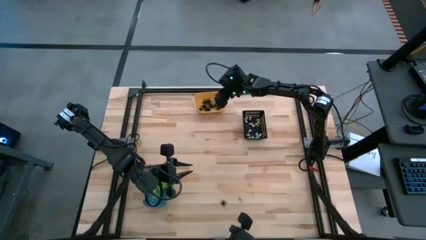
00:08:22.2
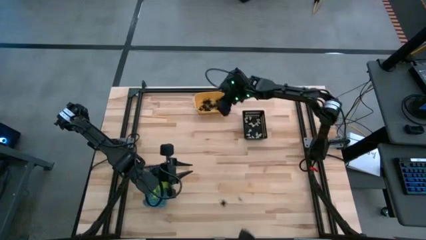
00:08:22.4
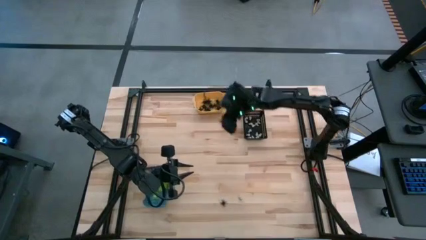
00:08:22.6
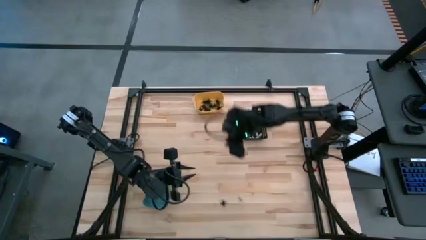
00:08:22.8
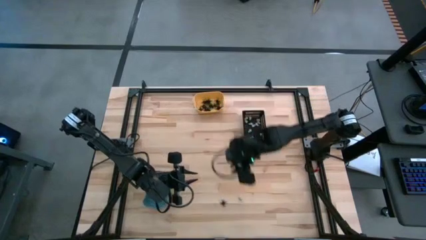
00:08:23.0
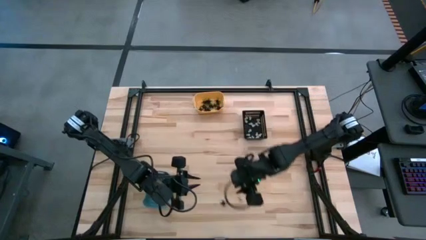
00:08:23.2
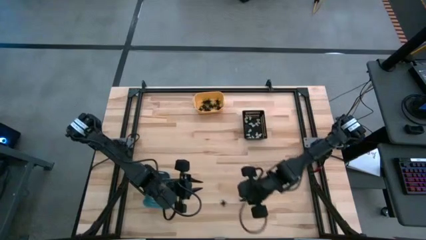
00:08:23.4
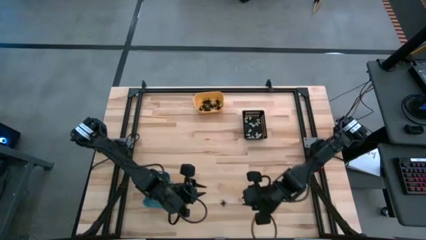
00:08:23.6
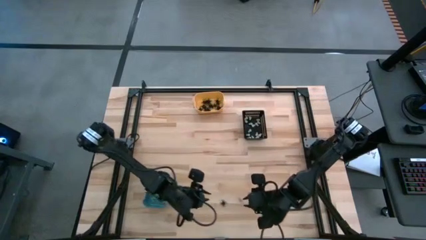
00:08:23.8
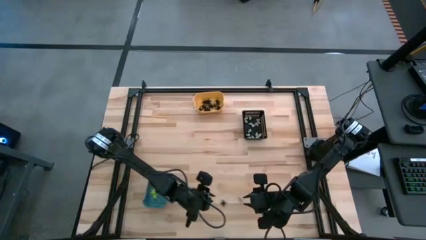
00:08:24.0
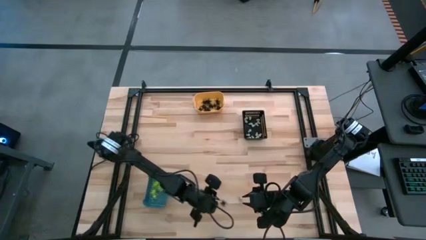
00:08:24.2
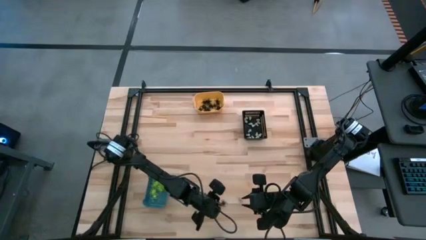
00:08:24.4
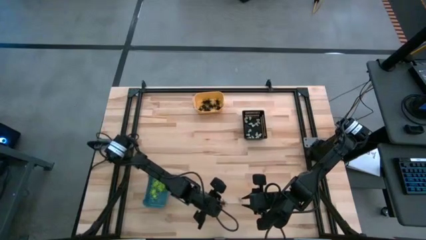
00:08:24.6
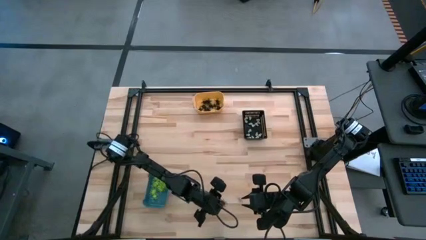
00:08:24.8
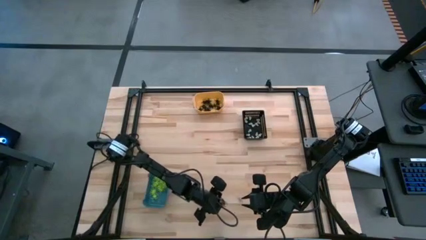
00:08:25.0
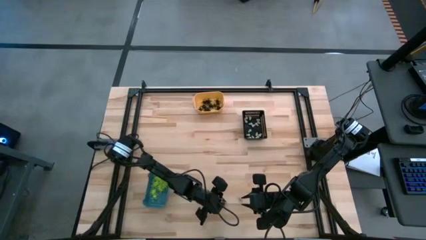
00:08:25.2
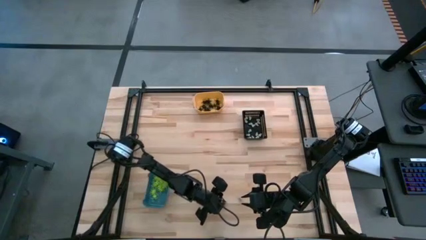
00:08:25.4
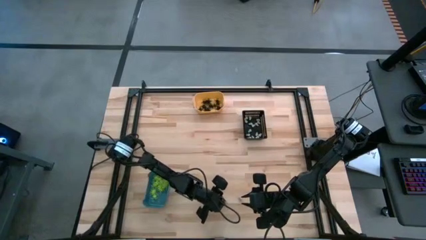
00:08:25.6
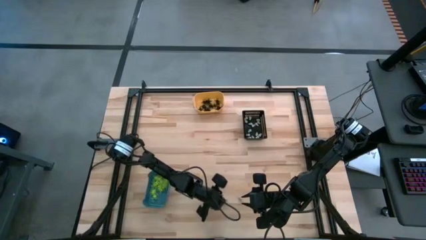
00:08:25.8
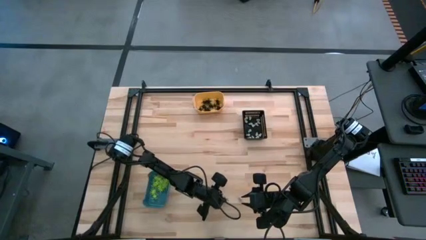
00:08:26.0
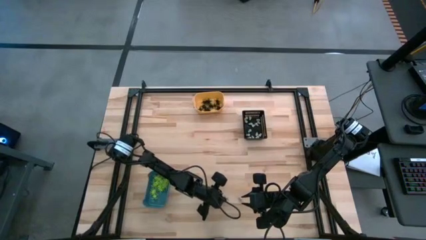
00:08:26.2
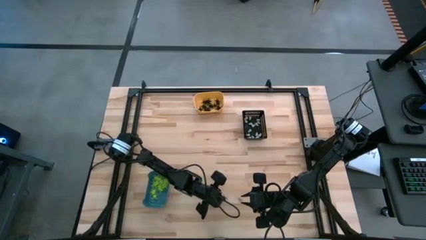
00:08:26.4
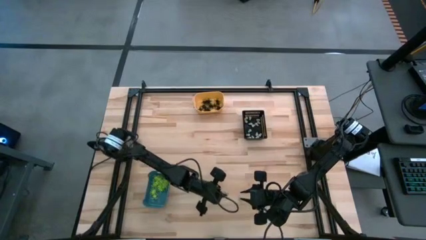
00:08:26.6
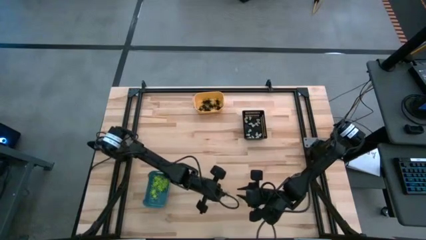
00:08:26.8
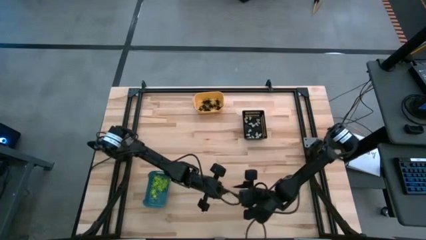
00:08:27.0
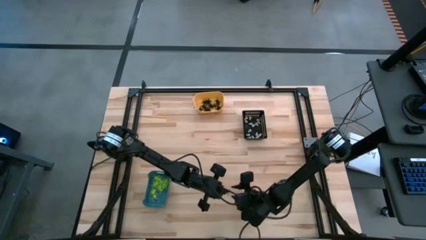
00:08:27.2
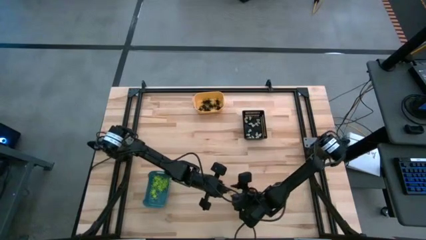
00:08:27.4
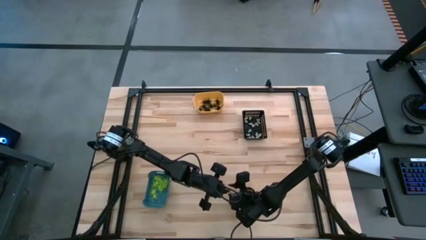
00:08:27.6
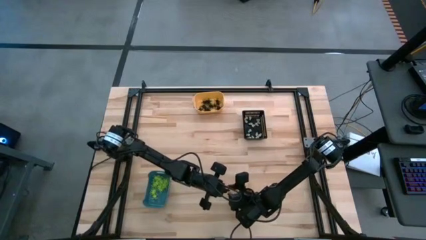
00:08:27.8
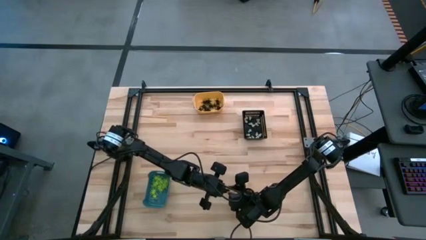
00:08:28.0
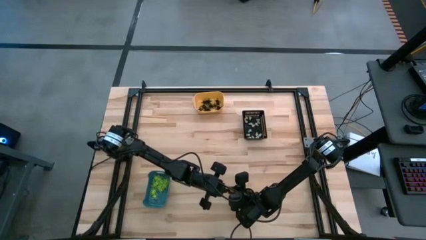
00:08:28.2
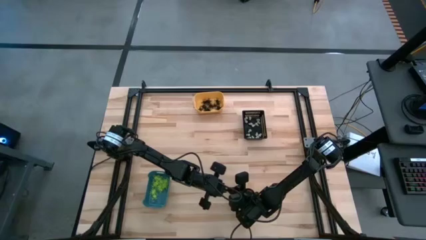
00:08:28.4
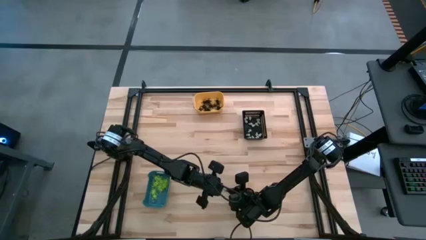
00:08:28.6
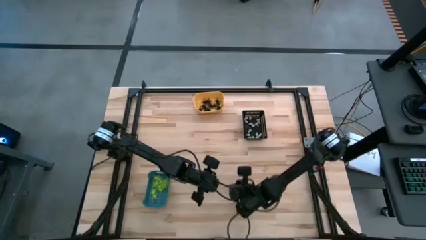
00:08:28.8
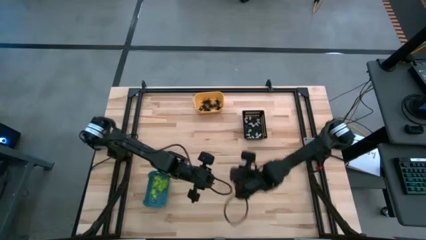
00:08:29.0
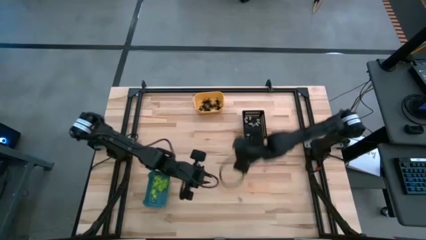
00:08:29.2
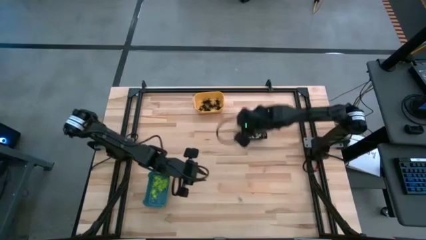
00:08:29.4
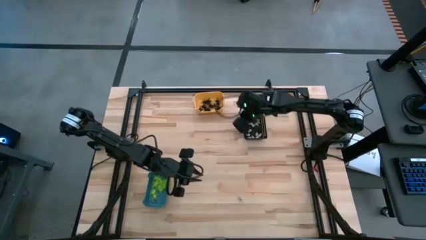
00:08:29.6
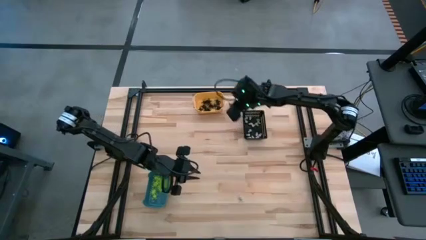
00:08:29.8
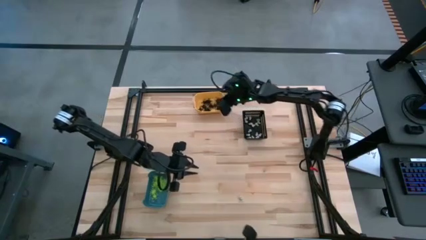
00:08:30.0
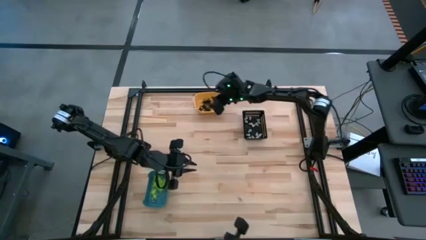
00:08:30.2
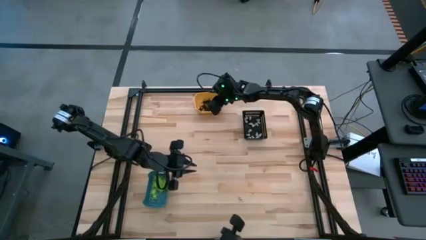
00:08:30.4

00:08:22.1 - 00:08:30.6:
Task: Sort Halloween decoration
Put the black spider toy into the yellow bin

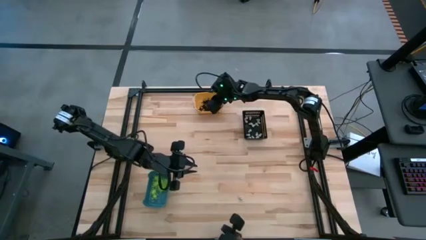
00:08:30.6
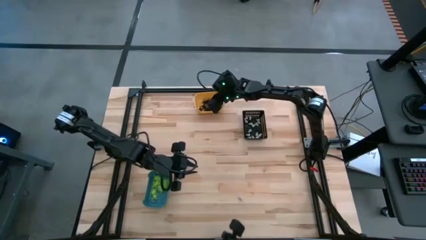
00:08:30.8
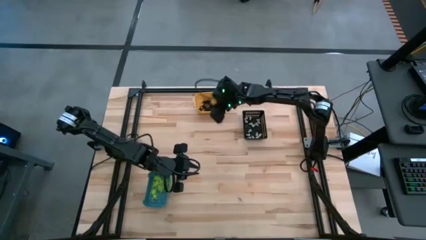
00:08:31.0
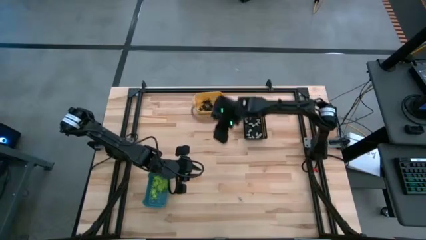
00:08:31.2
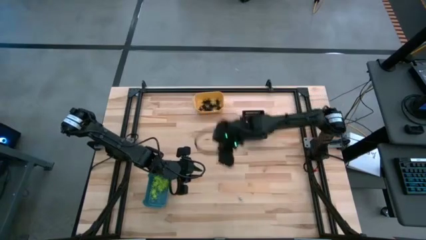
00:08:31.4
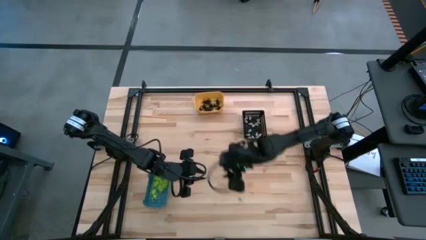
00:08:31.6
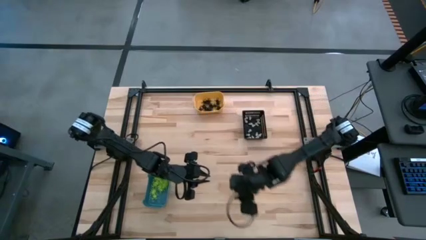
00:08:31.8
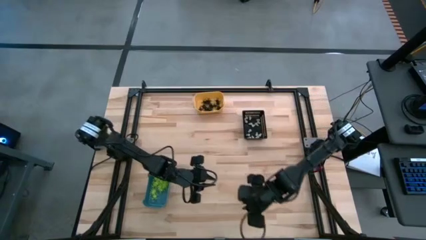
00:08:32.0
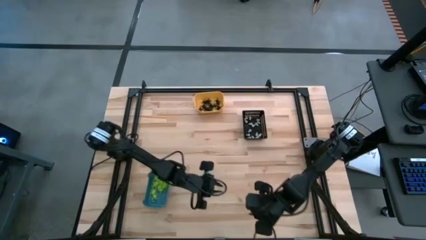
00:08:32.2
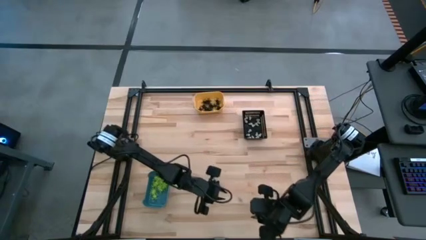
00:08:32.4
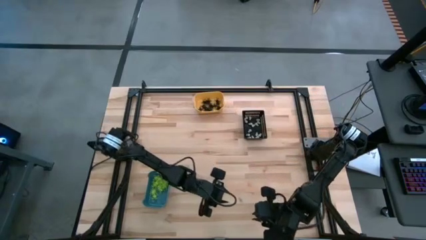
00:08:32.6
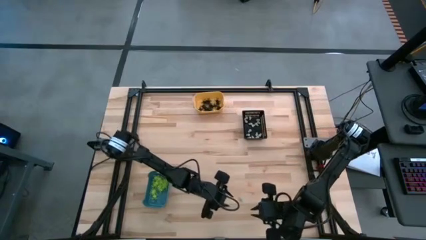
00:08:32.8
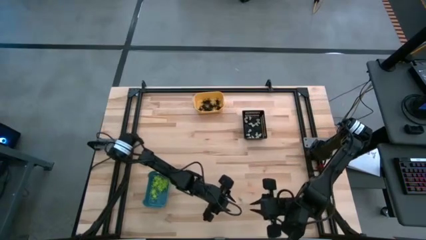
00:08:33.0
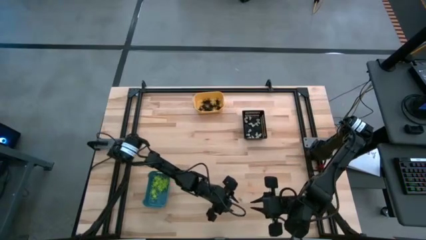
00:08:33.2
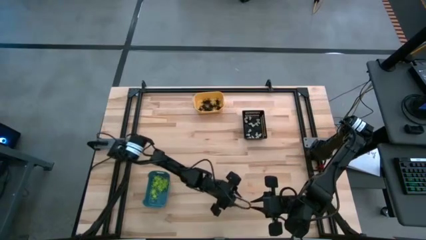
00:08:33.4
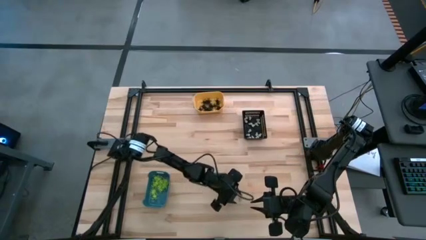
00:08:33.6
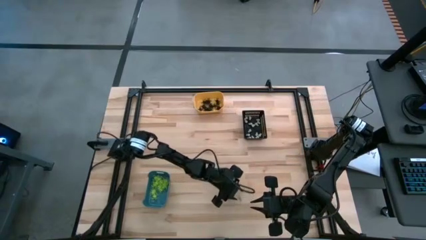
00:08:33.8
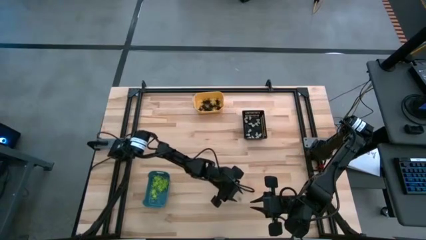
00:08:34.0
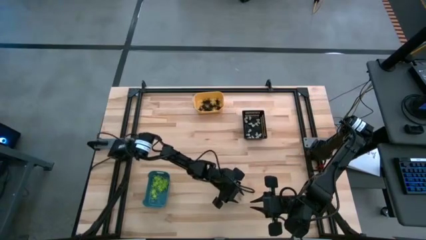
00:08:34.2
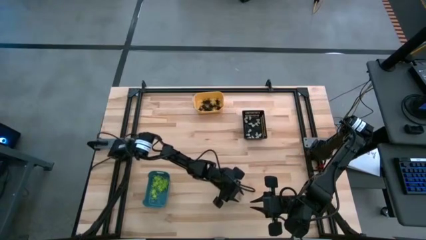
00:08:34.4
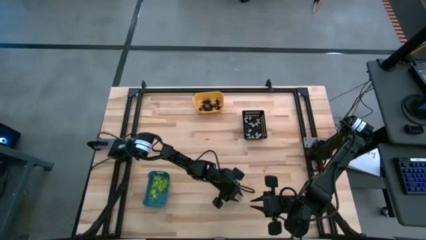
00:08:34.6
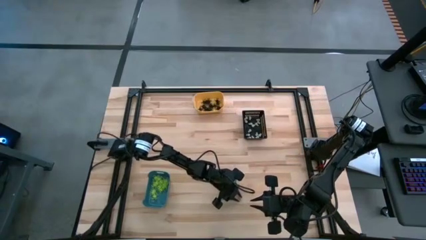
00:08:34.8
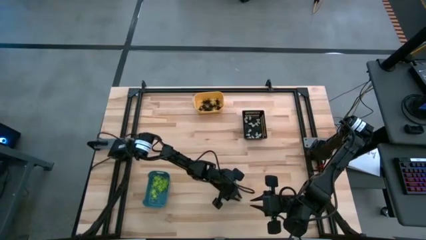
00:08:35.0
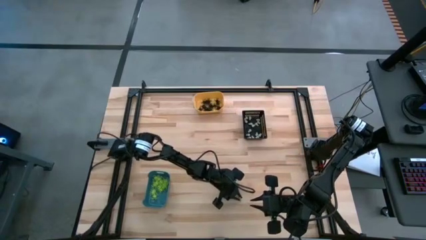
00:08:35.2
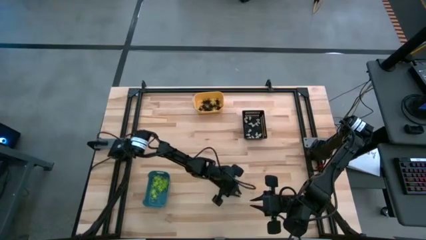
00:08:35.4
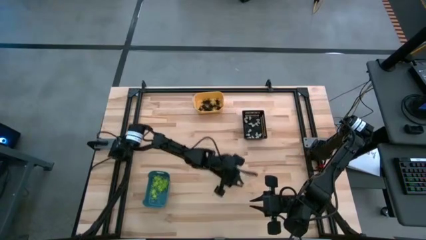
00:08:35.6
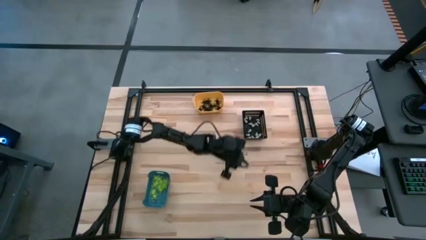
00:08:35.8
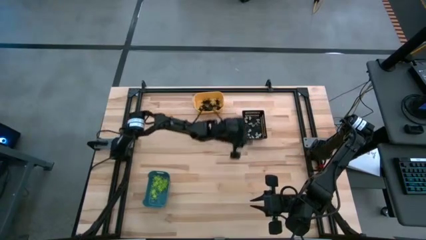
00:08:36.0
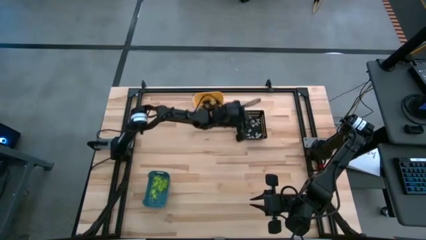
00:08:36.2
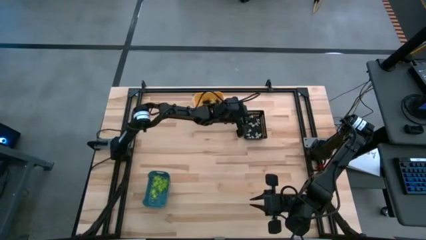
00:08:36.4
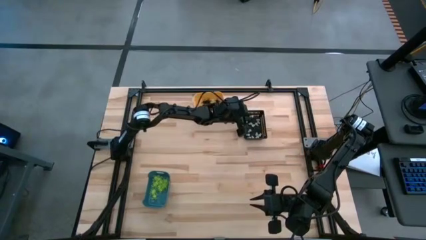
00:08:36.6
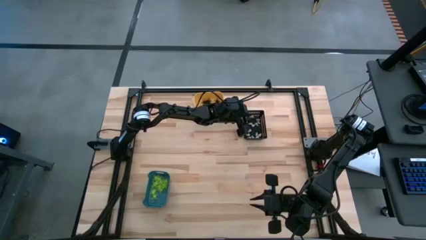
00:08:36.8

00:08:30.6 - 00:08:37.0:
Put the white skull toy into the black bin

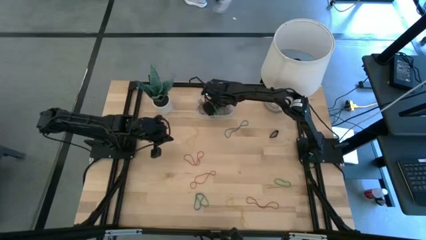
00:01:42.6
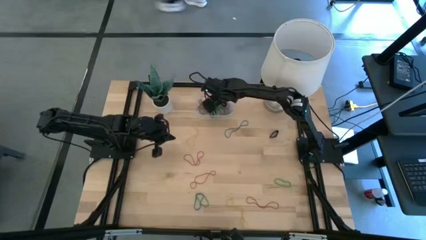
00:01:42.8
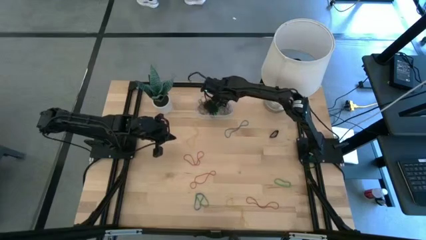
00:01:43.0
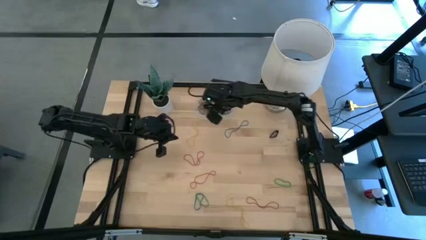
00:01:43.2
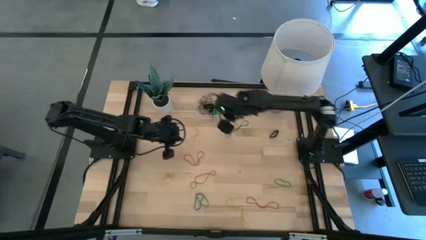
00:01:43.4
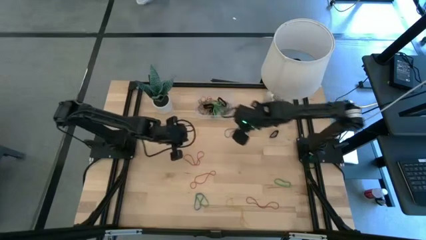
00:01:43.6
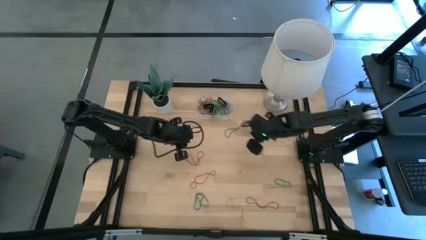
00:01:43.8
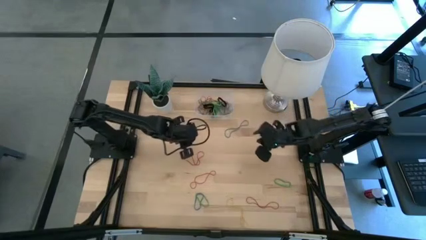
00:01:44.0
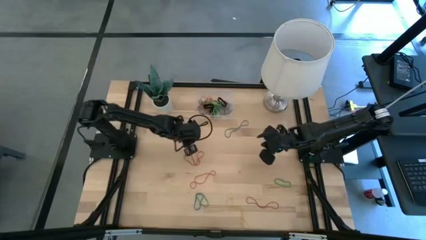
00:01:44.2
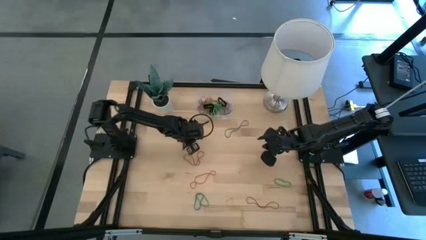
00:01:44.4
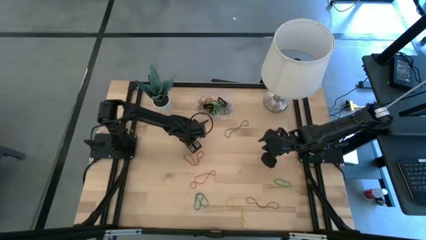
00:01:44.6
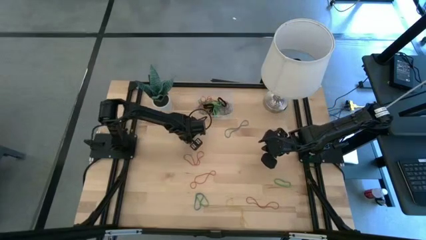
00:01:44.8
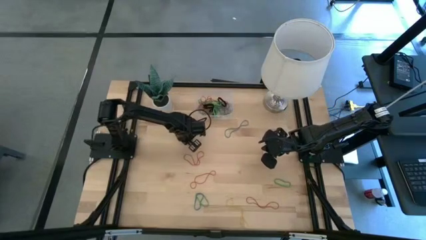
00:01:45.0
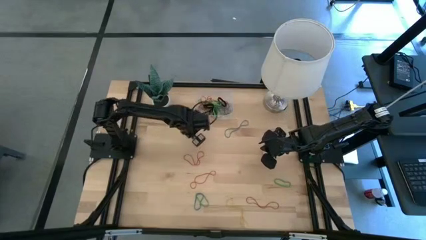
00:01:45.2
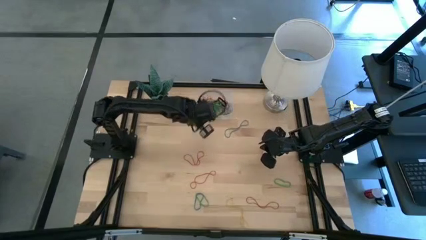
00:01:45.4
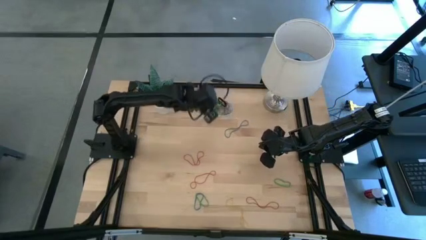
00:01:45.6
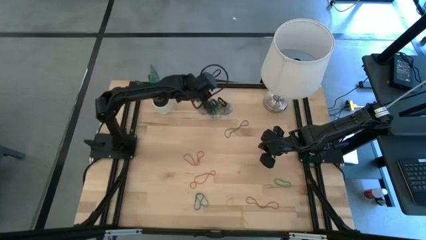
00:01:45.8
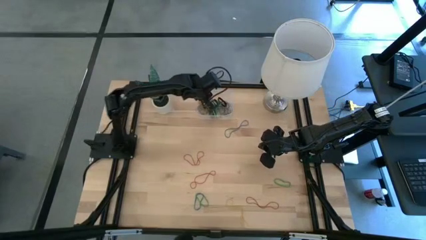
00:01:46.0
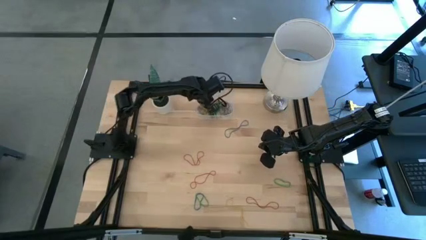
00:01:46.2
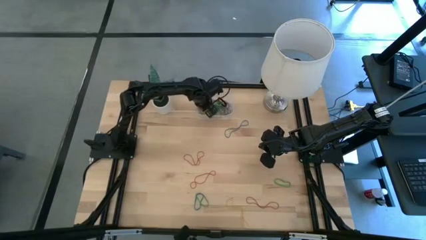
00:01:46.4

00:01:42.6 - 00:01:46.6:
Task: Pick and place rubber bands into bin
Put the yellow rubber band into the transparent bin
